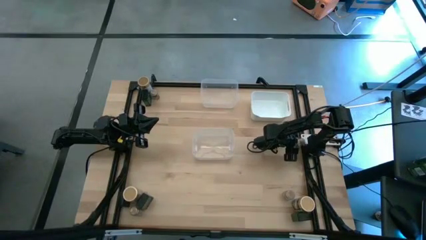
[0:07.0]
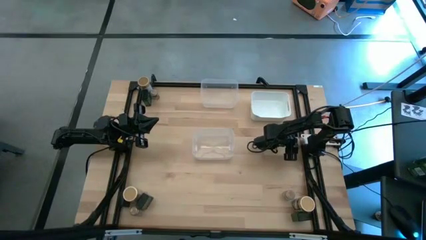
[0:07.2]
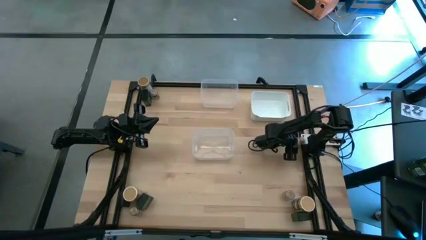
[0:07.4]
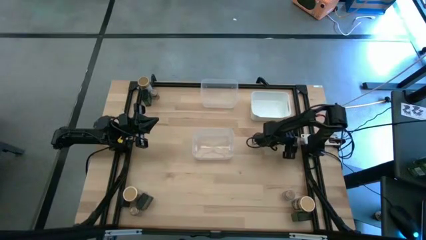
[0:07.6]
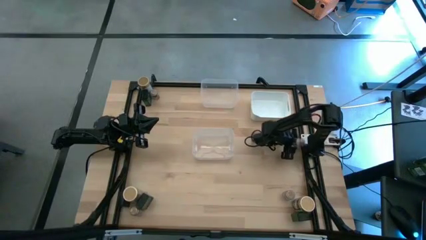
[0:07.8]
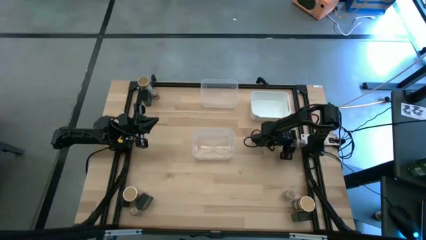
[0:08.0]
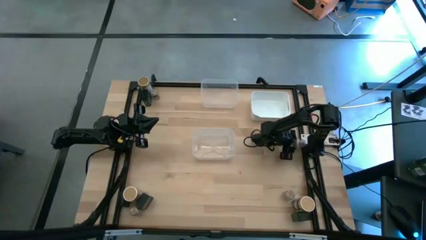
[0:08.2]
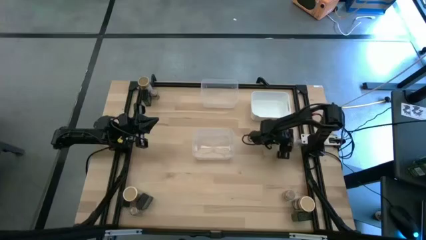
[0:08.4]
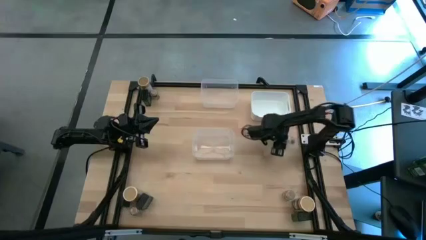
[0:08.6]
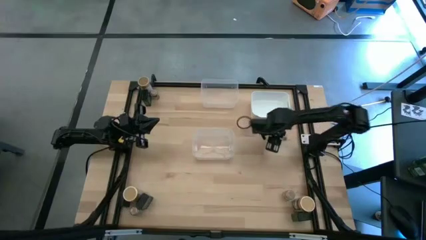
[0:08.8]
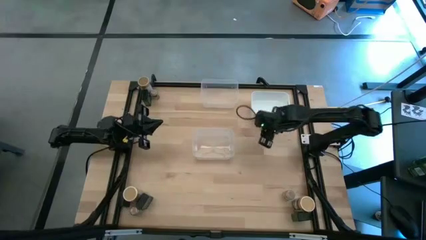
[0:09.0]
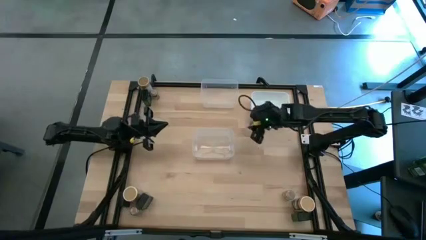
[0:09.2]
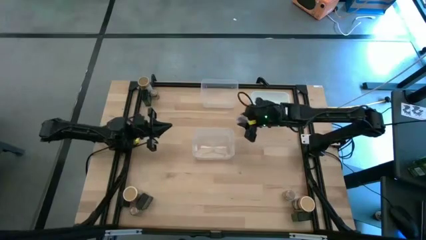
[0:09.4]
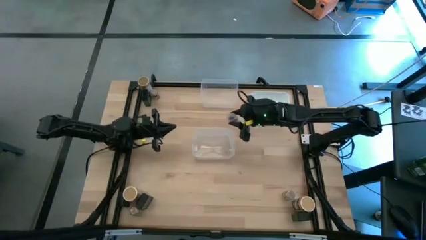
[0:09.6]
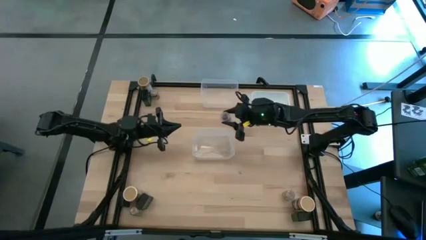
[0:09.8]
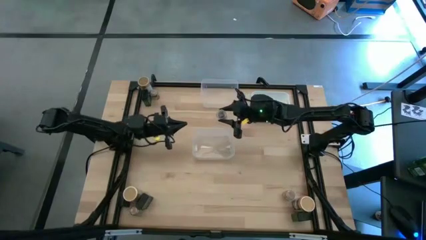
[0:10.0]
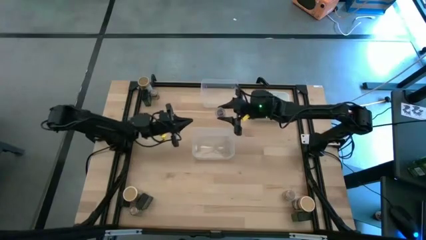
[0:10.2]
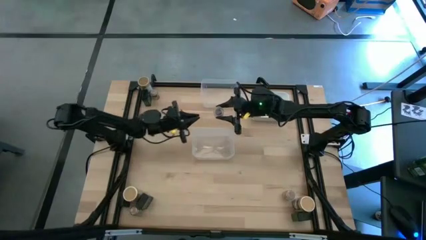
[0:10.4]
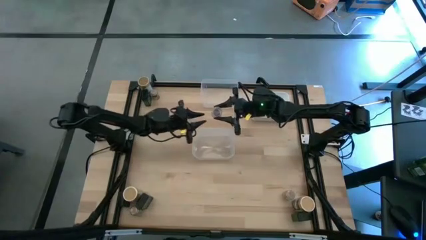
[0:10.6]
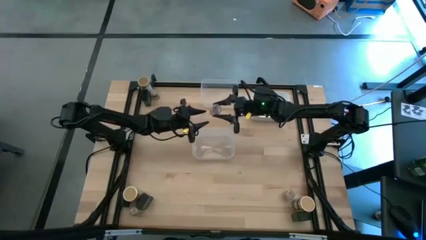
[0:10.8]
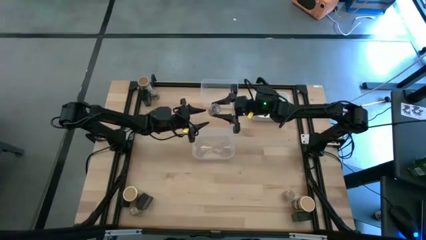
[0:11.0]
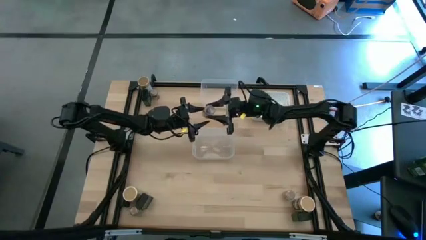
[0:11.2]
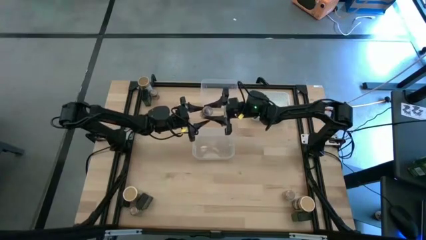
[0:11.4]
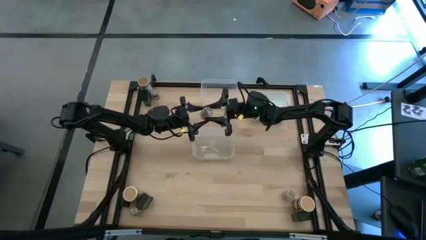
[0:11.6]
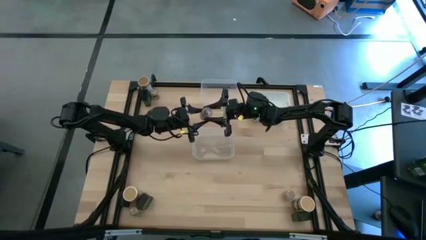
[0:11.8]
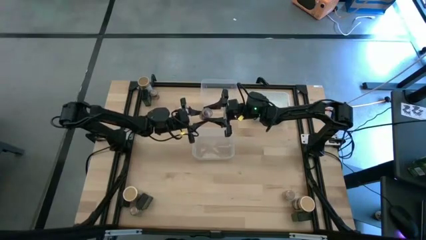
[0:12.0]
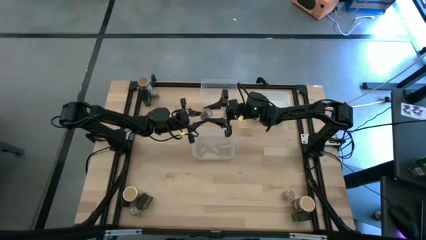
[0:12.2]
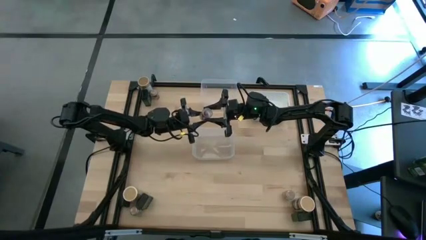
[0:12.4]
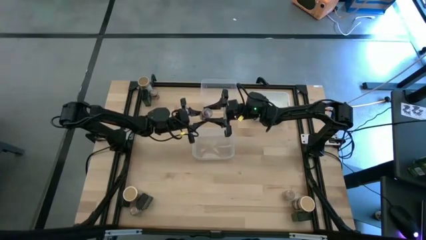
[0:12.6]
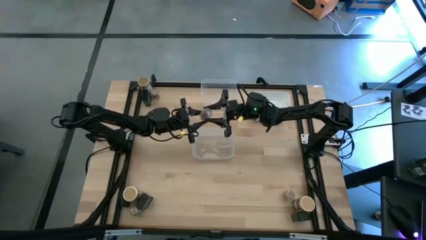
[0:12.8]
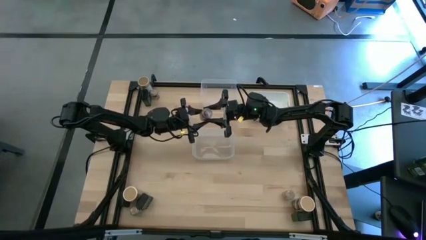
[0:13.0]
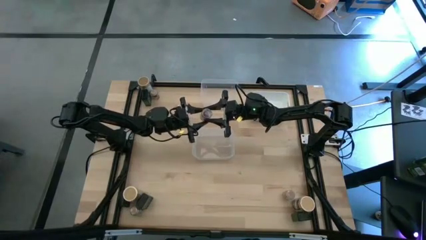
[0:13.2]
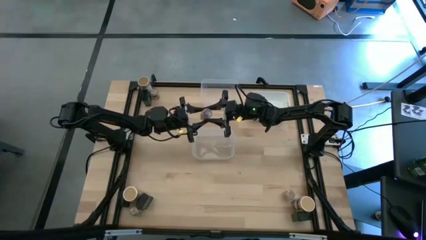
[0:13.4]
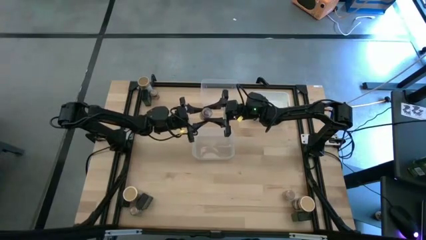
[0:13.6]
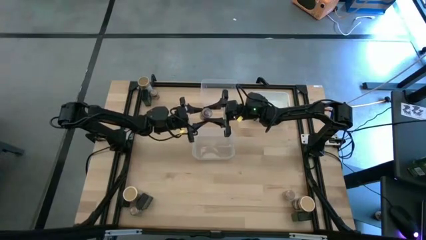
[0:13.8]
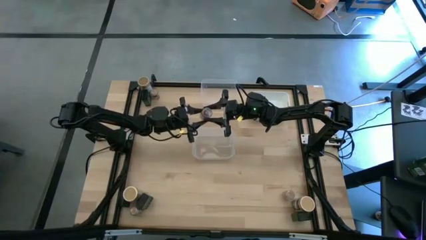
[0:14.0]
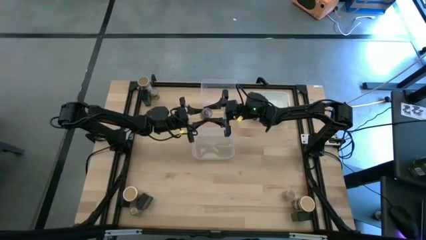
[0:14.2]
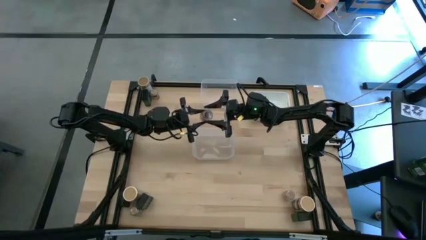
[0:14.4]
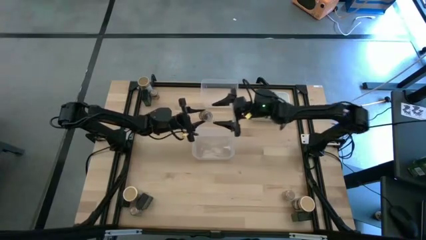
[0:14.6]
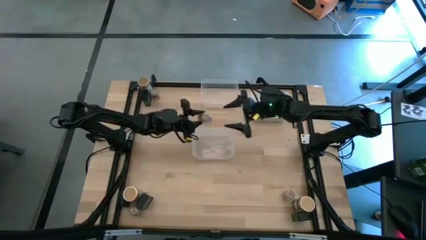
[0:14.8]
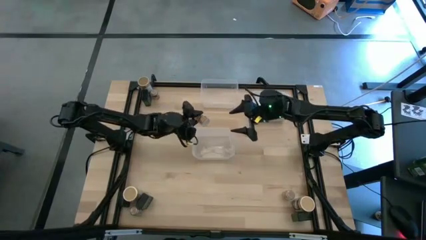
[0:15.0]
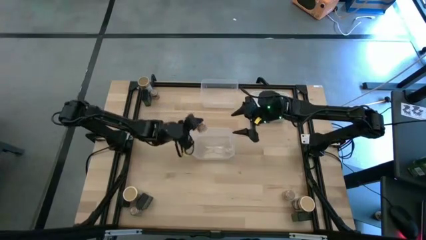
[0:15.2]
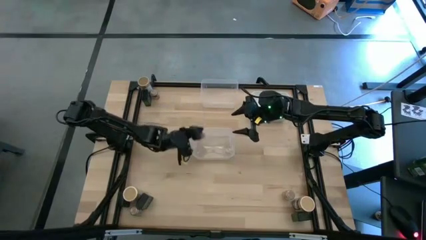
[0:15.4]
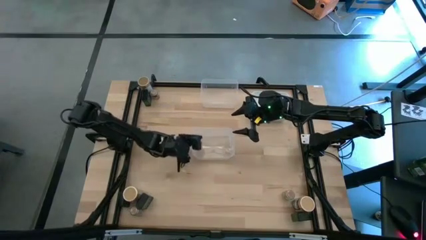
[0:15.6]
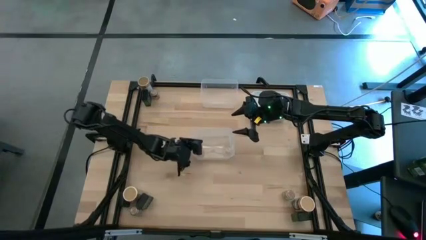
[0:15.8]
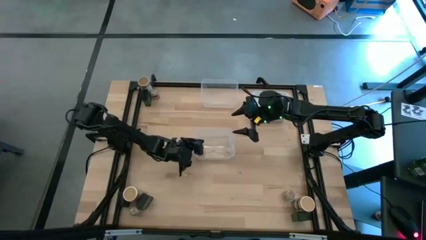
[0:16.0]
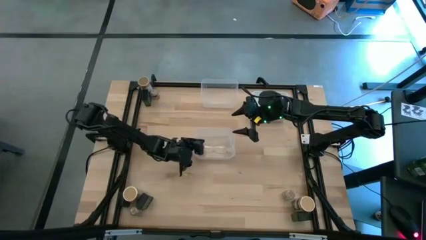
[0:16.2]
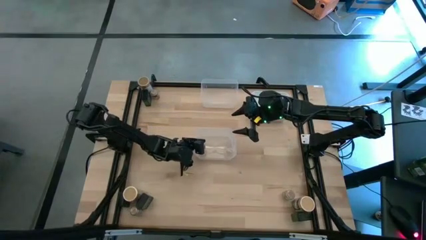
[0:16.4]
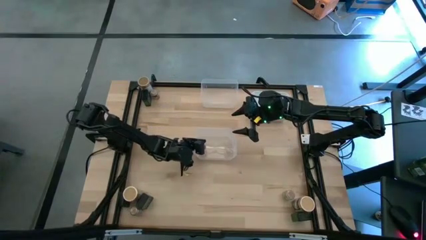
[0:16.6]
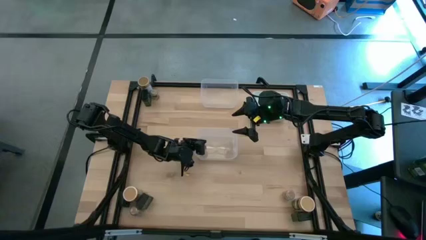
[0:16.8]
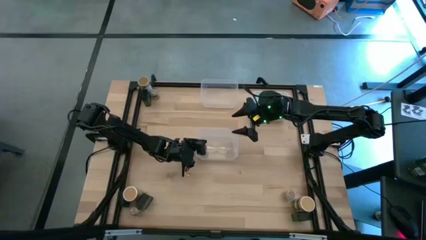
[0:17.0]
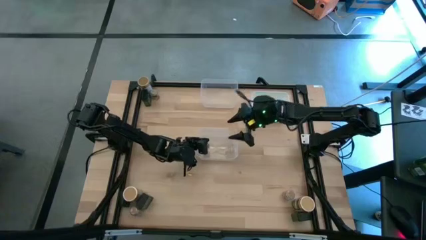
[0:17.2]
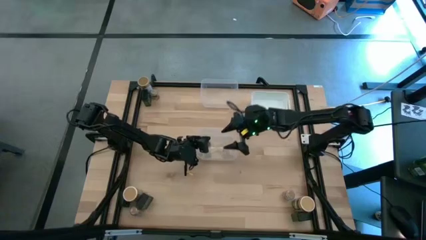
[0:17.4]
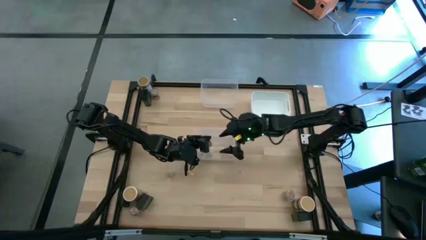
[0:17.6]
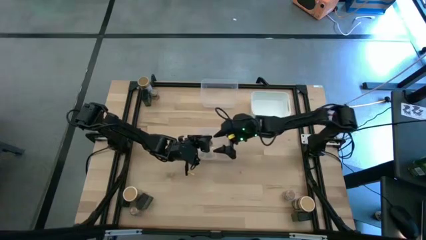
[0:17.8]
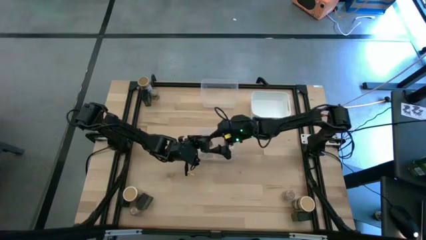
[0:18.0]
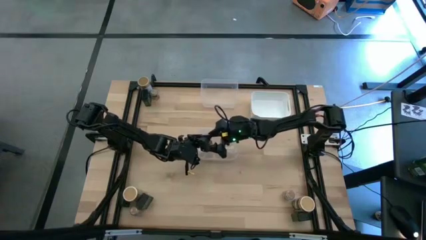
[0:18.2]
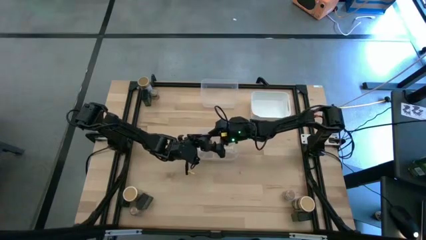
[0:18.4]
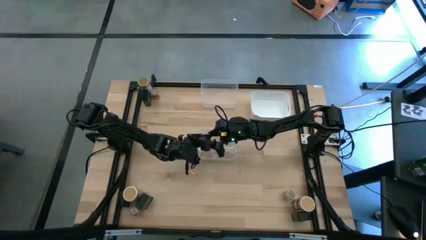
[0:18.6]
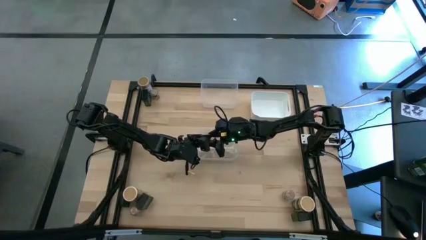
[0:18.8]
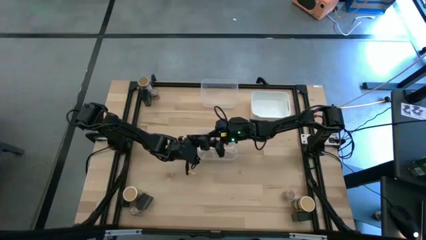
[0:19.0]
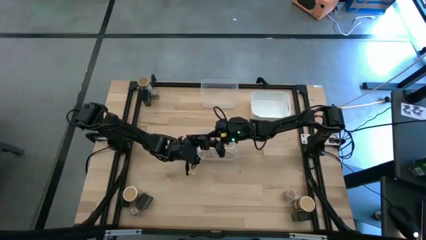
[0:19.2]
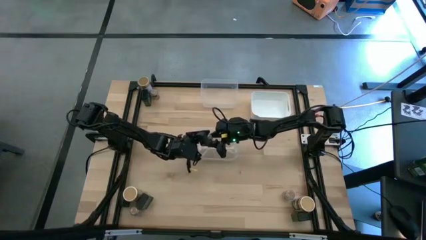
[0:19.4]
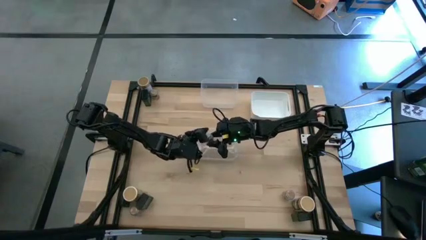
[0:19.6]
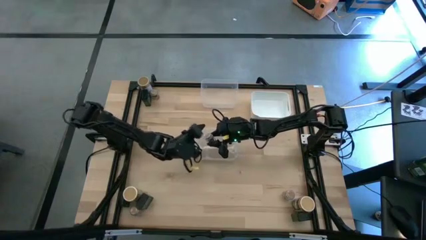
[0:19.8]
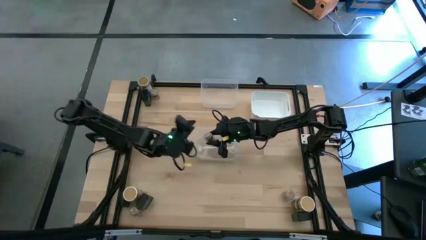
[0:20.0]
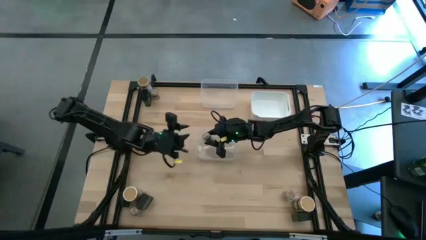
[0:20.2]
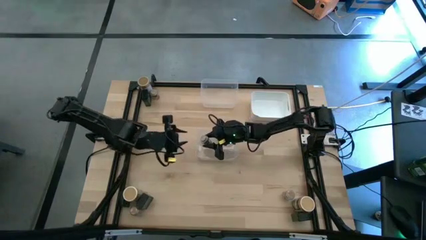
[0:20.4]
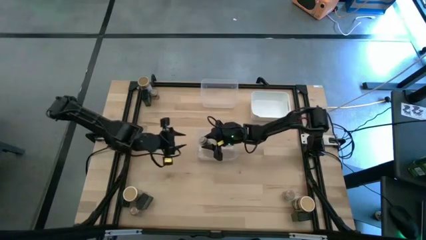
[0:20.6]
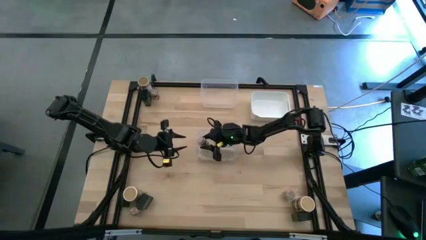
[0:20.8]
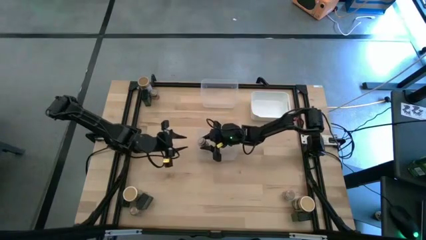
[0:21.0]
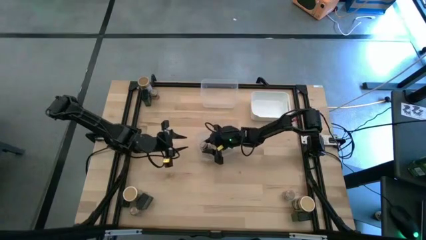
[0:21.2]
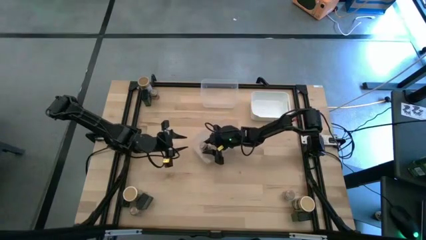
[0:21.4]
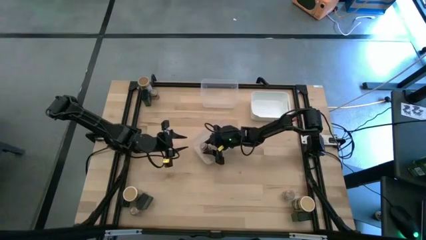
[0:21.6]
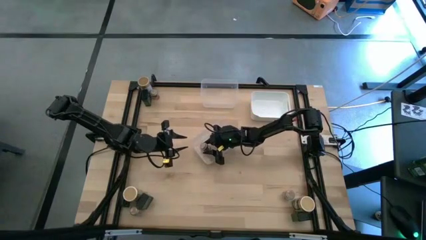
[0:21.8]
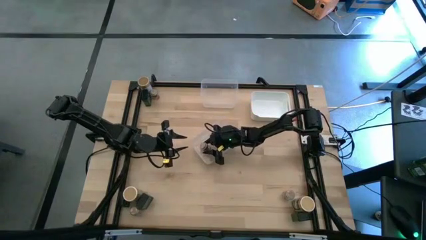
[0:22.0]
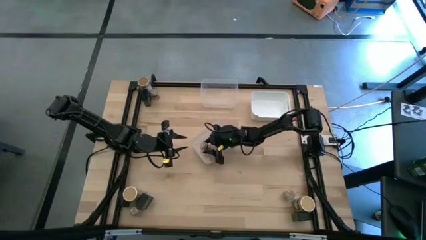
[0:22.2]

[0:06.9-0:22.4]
Task: Sort spices by type
Put the middle right transparent seasoning bottle into the bottom transparent bin

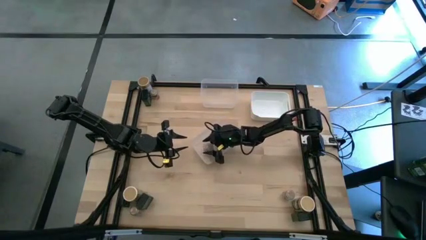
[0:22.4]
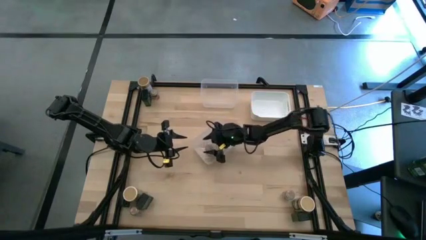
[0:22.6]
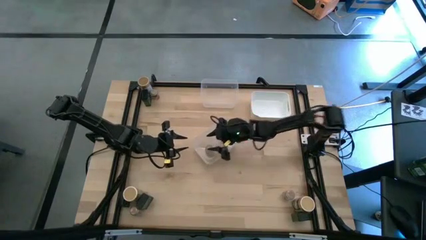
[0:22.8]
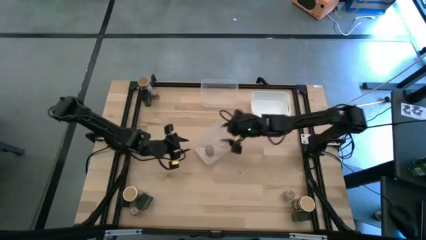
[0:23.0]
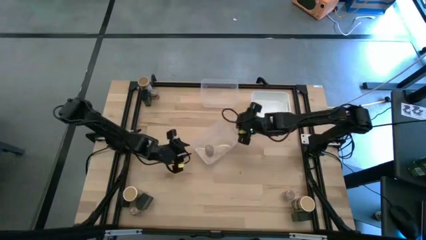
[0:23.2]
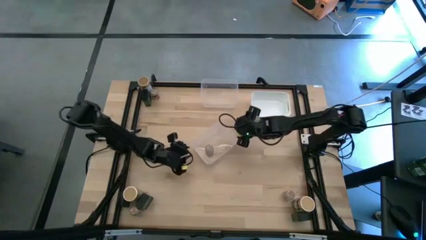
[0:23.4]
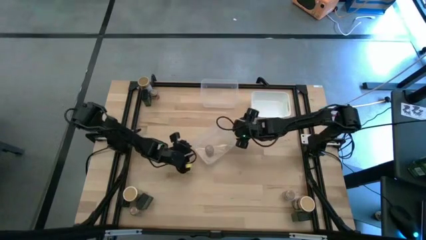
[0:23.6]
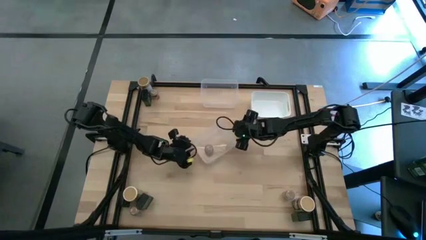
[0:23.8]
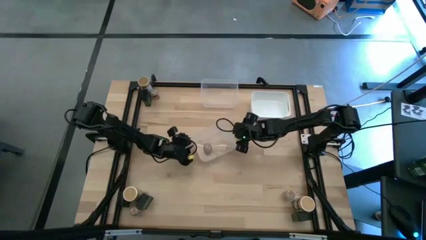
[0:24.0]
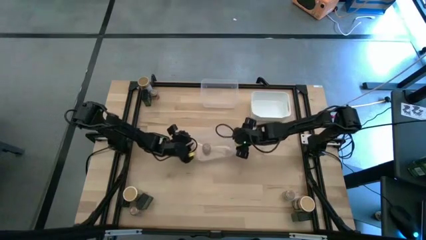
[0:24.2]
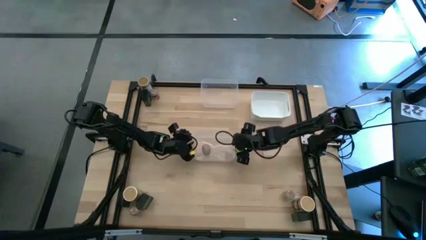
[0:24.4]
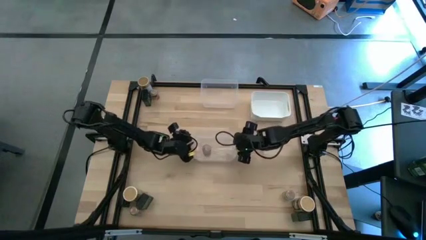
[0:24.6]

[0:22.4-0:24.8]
Adjust the bottom transparent bin
